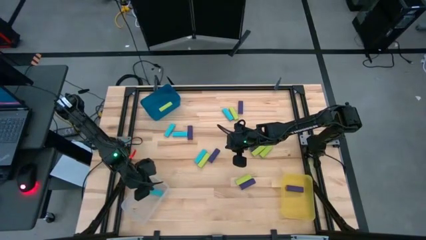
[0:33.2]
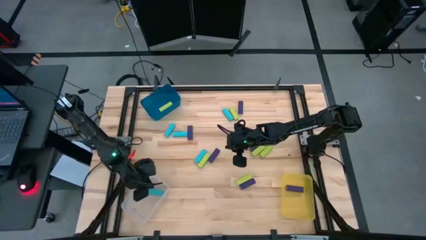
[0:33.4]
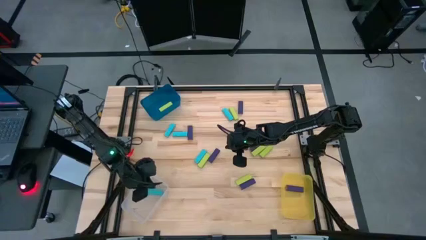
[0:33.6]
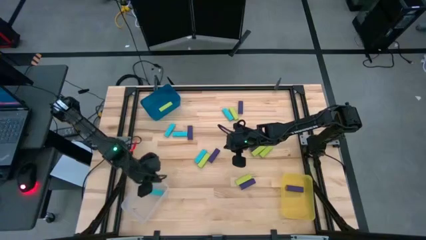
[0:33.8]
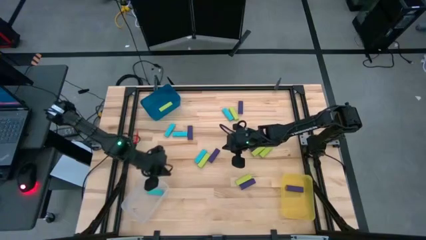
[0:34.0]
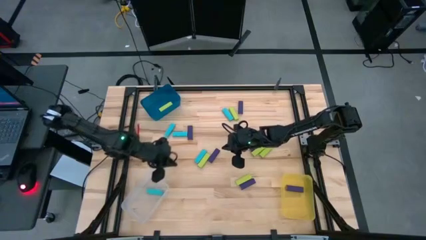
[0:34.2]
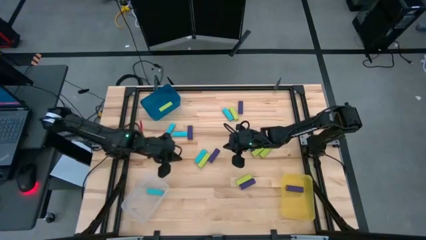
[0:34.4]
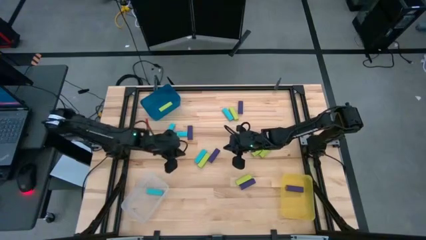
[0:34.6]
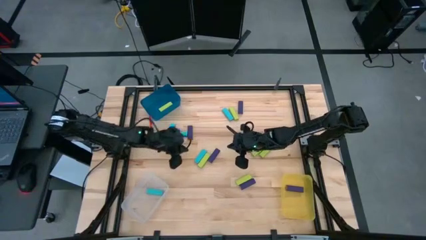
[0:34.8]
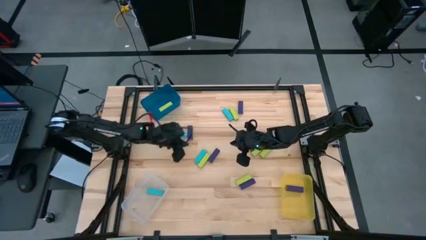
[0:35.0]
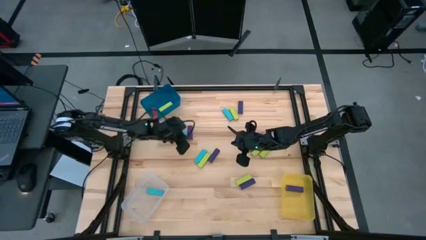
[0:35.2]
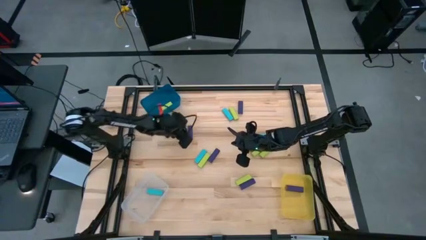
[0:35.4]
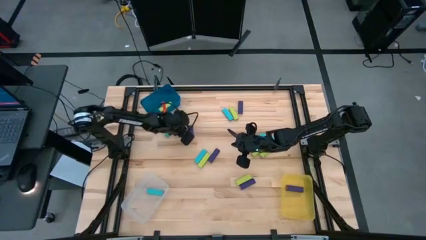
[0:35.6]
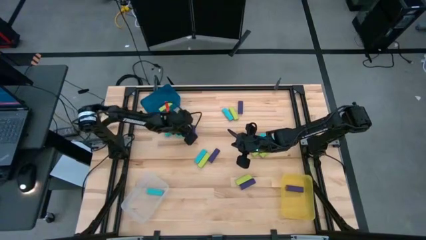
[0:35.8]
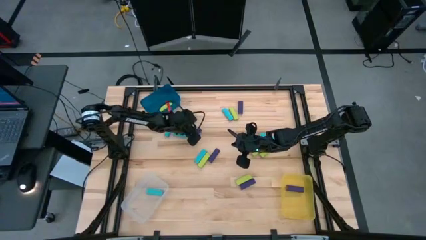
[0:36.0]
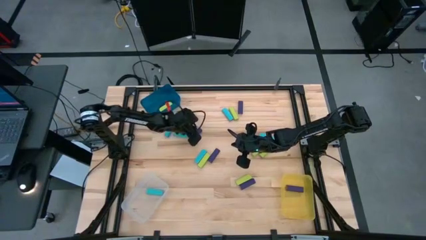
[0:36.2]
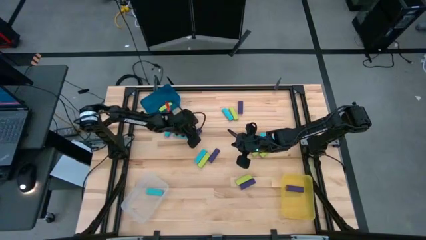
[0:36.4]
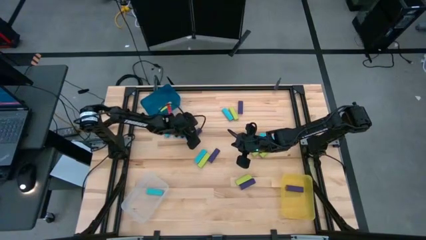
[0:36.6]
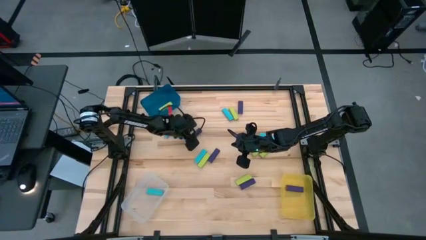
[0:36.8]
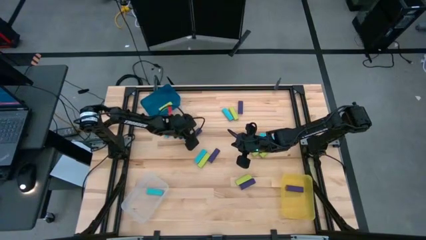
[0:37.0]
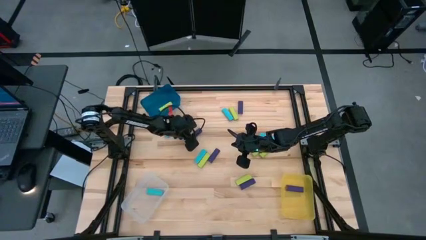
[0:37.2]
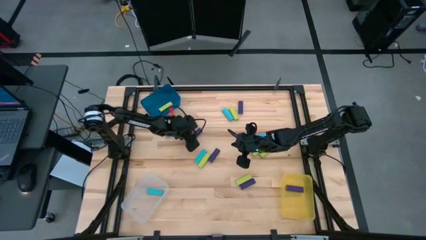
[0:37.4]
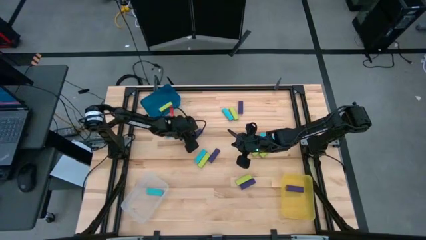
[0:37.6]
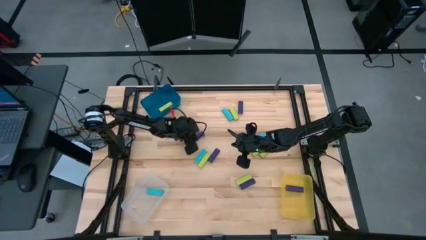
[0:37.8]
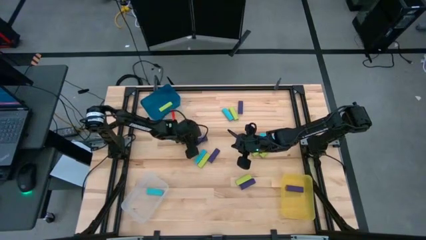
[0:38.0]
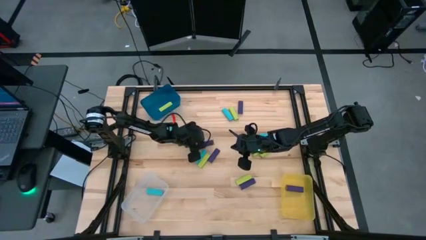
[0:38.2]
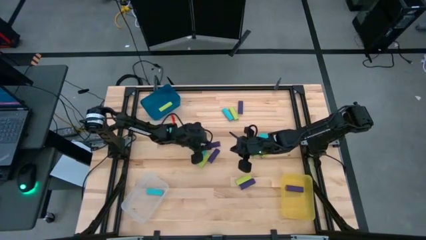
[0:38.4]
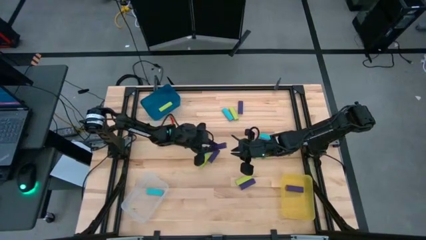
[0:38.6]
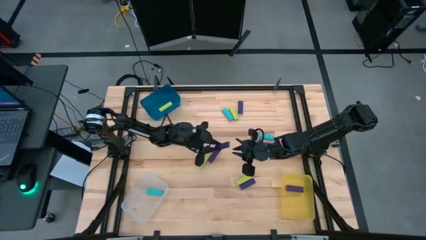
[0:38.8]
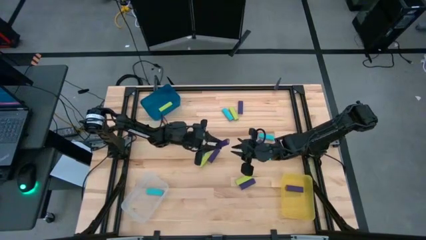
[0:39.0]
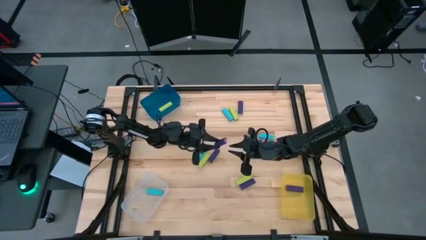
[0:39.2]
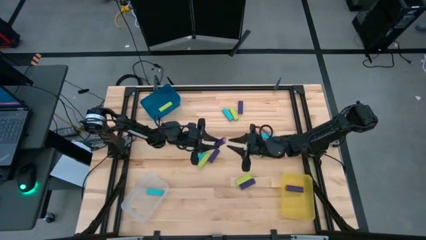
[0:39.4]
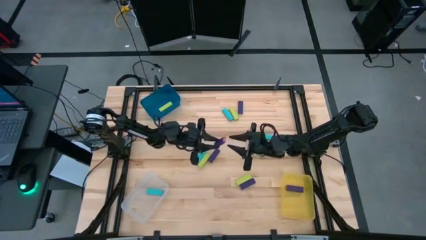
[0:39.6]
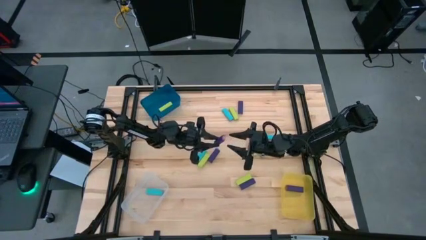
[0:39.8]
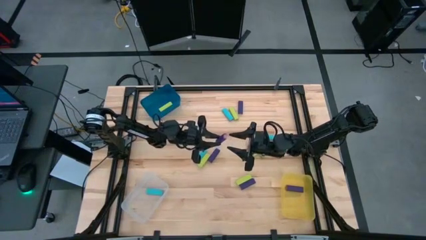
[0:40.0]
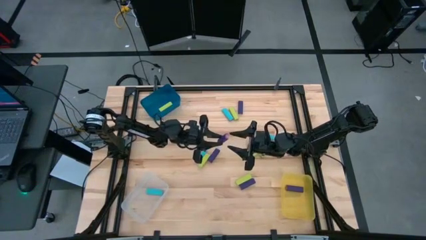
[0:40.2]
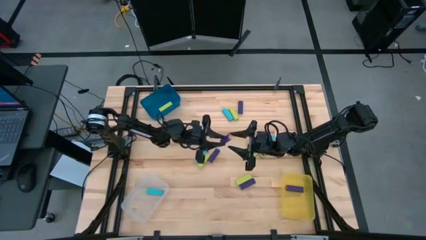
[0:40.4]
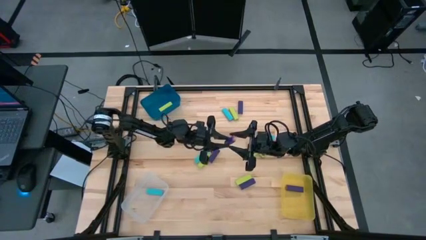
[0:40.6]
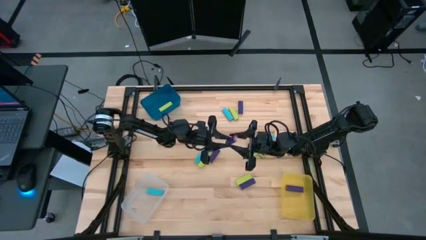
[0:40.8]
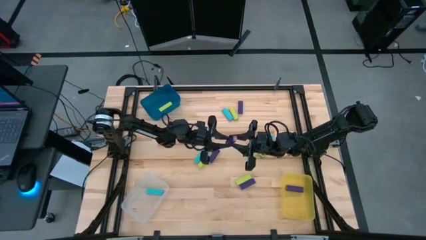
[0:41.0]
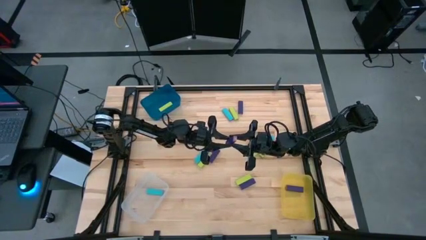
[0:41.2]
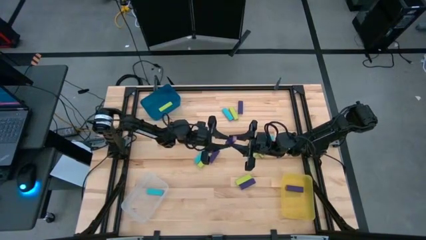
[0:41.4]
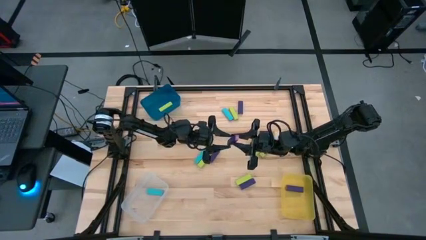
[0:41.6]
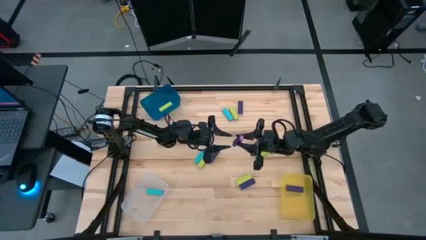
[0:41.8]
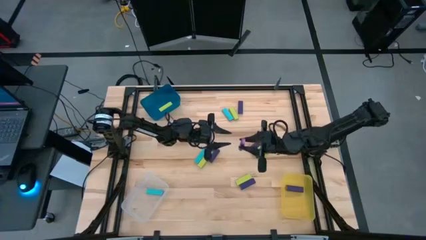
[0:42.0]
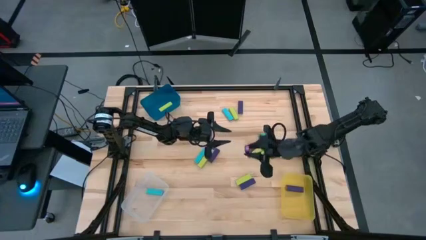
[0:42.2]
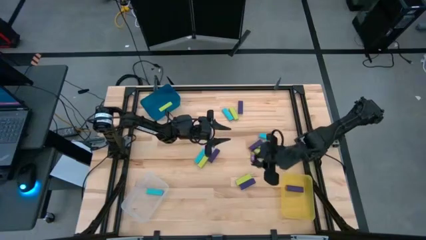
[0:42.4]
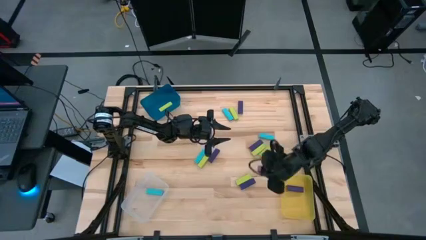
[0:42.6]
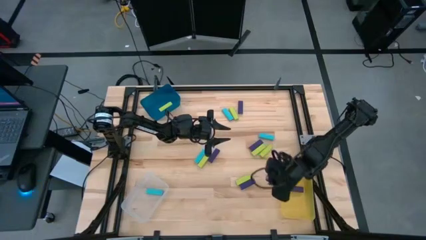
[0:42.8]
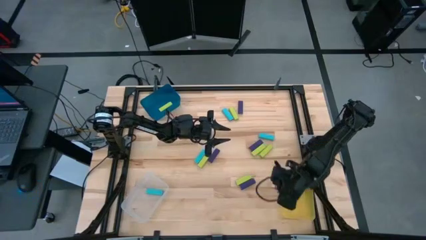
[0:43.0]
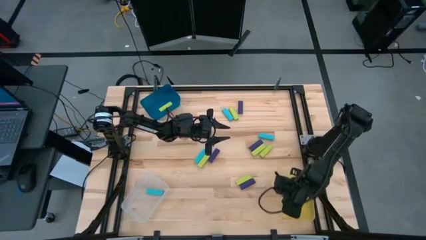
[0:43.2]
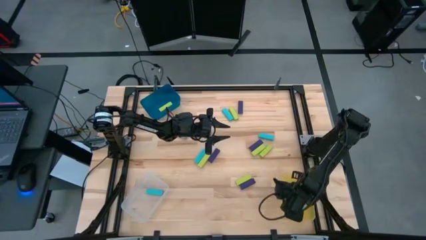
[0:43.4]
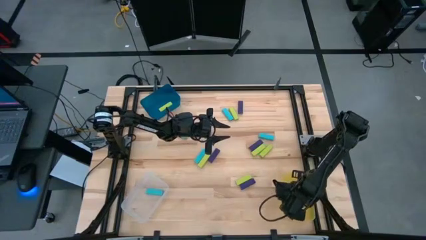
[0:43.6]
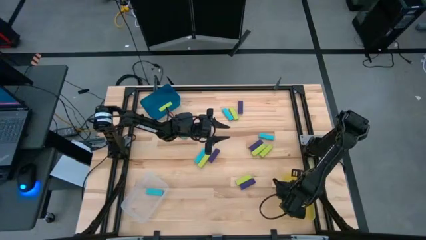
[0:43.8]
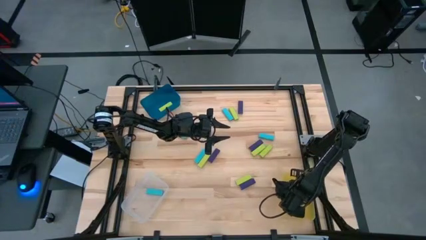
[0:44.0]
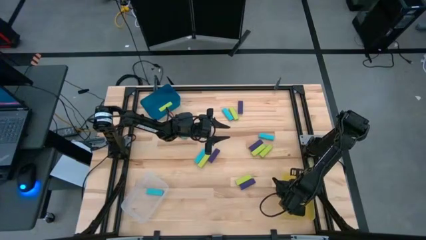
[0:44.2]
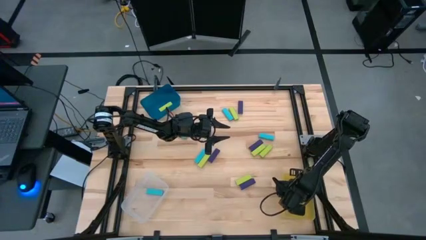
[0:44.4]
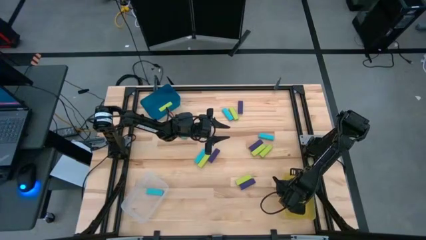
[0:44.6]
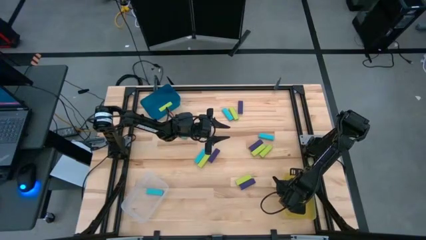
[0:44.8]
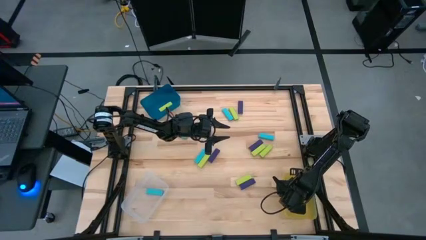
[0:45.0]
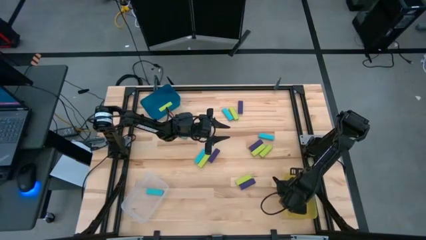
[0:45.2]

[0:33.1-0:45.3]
Task: Sort blocks
Put the violet block into the yellow bin

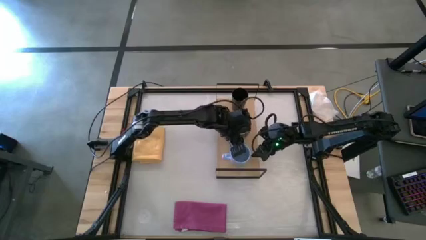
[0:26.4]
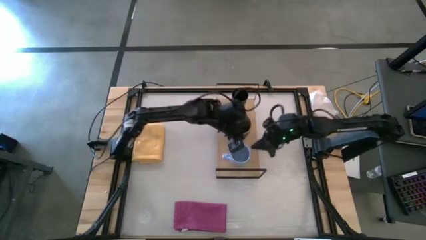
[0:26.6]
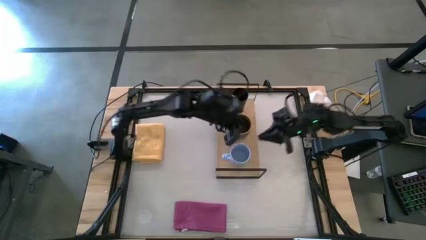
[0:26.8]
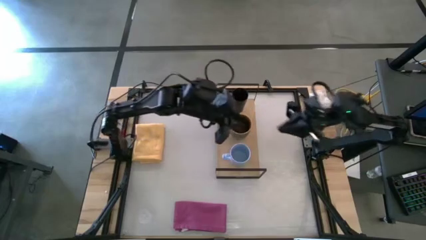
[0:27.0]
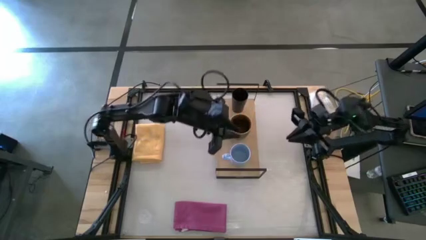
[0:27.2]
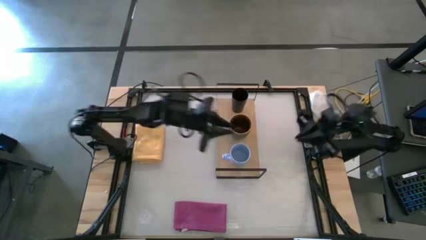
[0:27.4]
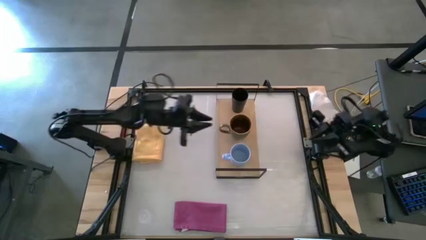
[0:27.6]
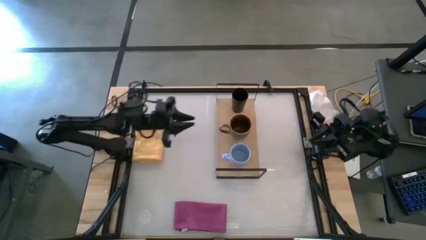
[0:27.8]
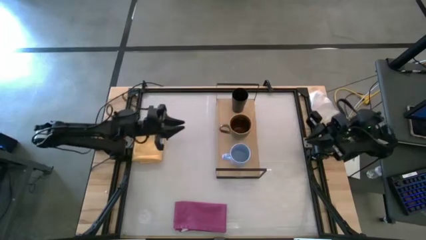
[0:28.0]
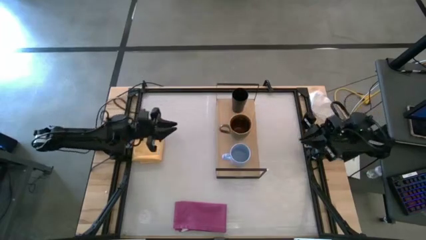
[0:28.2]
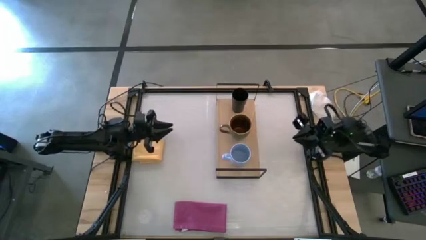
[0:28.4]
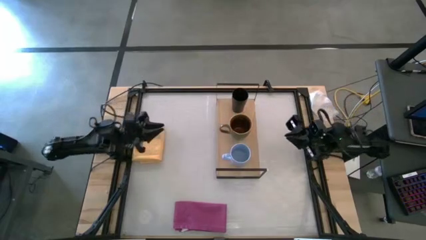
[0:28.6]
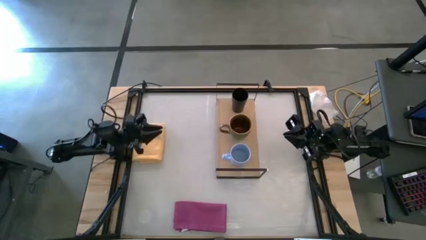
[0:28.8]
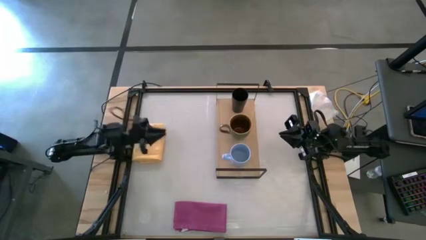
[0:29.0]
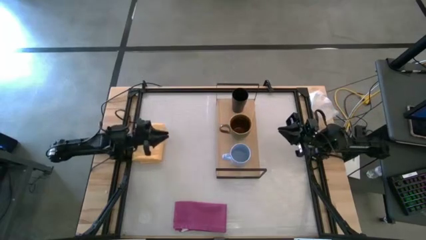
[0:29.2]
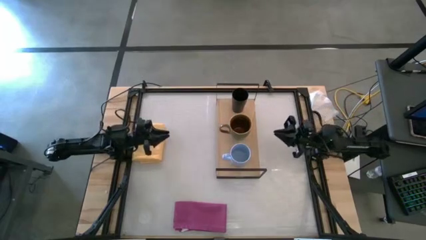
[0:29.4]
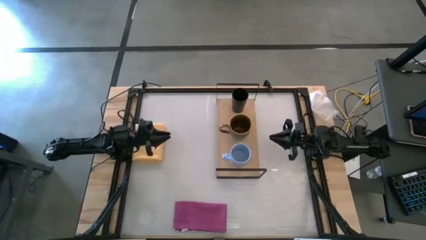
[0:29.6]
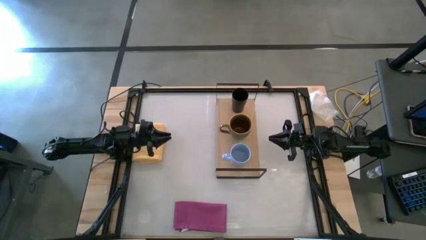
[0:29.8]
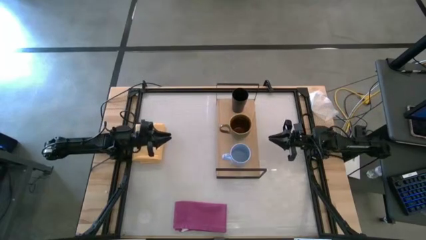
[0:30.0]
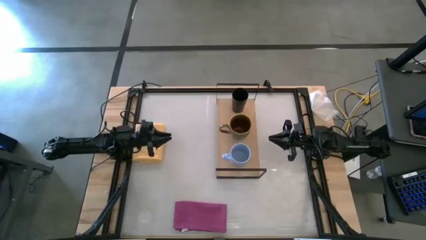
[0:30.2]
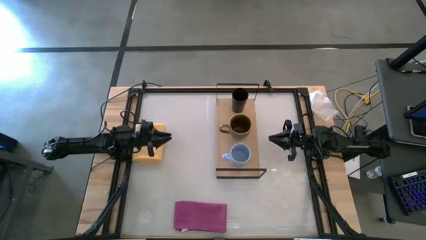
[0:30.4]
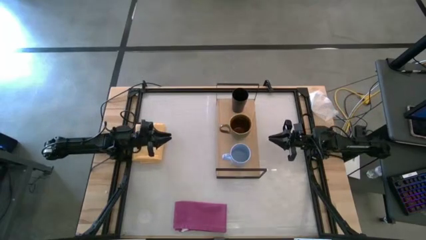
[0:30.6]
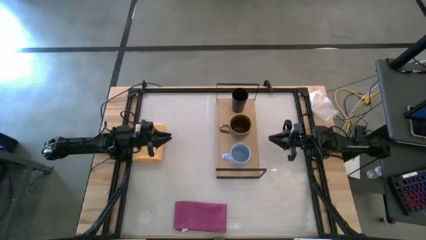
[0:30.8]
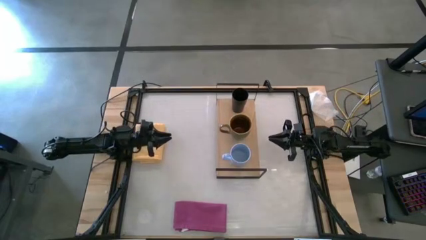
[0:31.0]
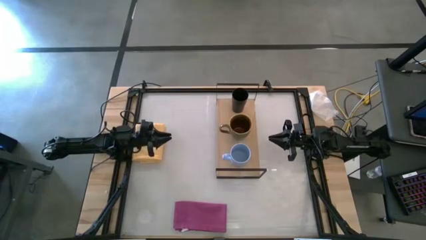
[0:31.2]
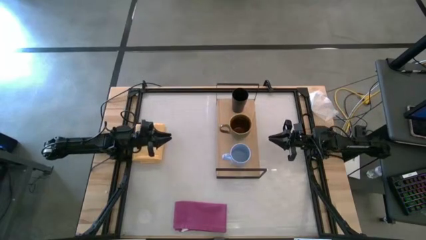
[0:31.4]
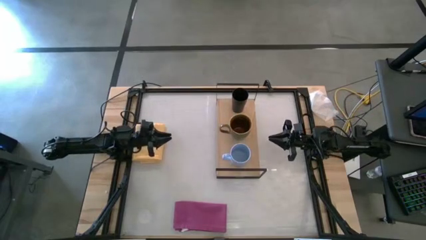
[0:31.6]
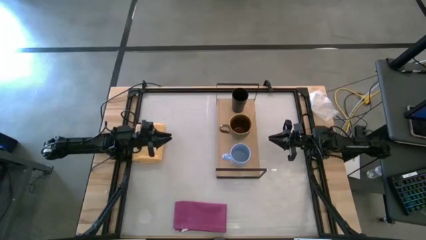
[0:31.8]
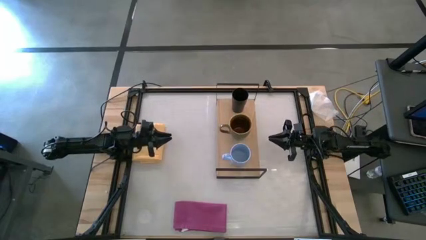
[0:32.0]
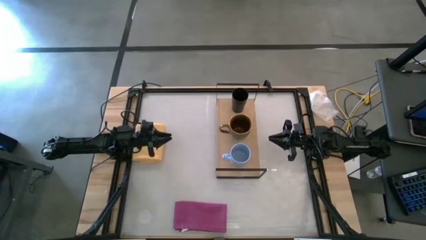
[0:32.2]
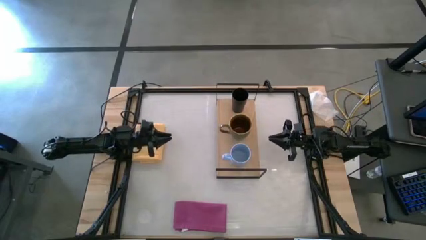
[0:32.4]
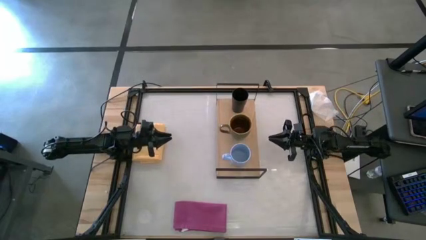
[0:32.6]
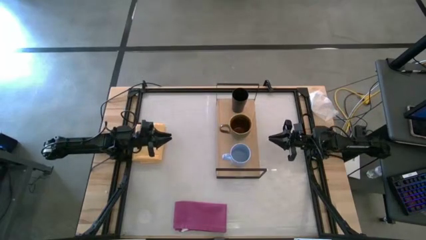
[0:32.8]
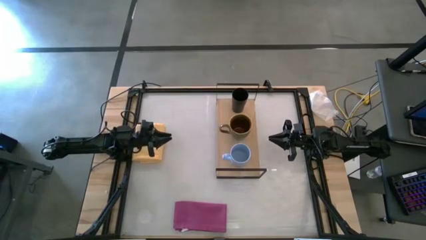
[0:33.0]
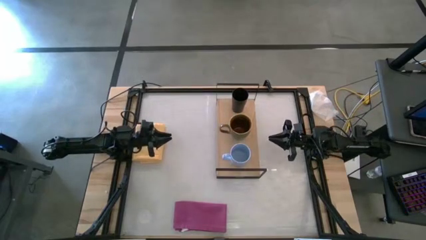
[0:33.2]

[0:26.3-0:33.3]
Task: Stack small to large cups/mugs on shelf
Return to Home Position
